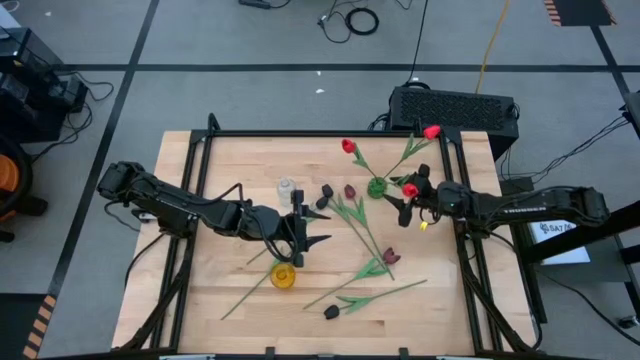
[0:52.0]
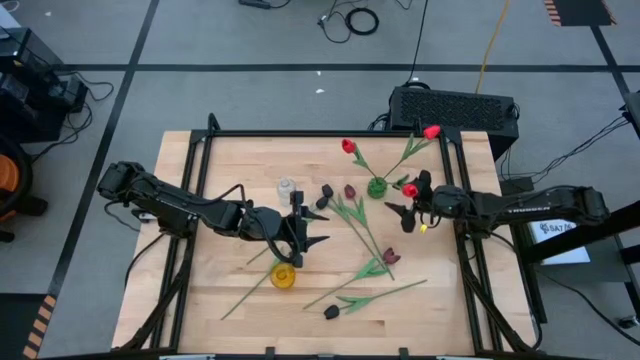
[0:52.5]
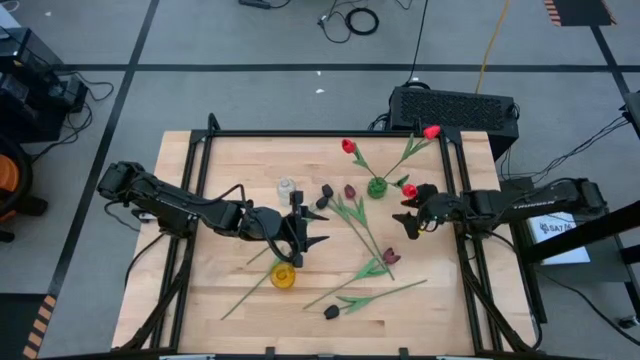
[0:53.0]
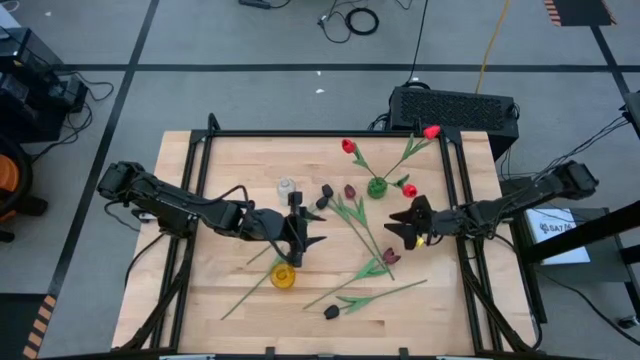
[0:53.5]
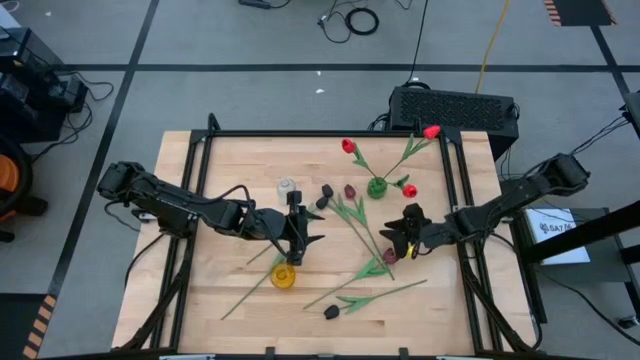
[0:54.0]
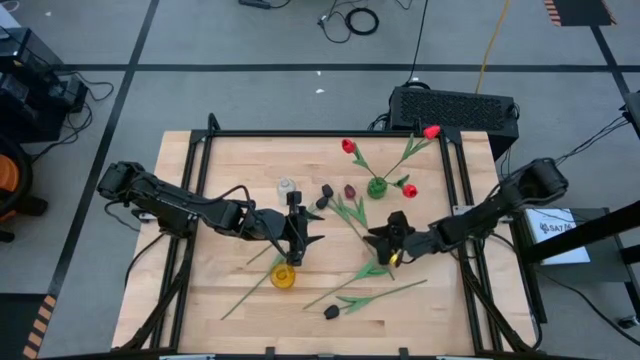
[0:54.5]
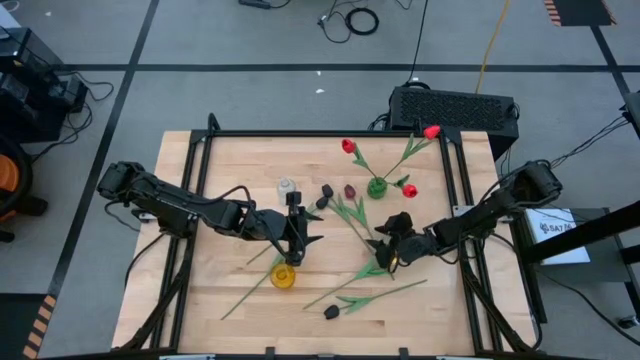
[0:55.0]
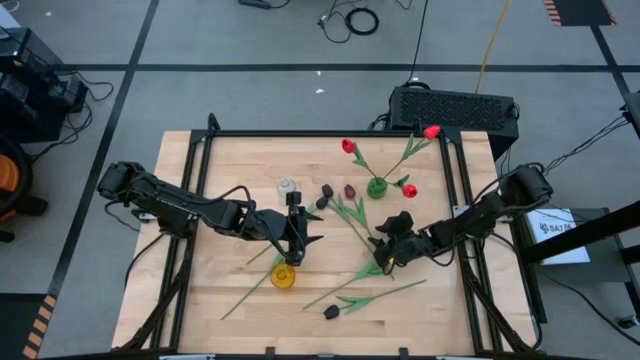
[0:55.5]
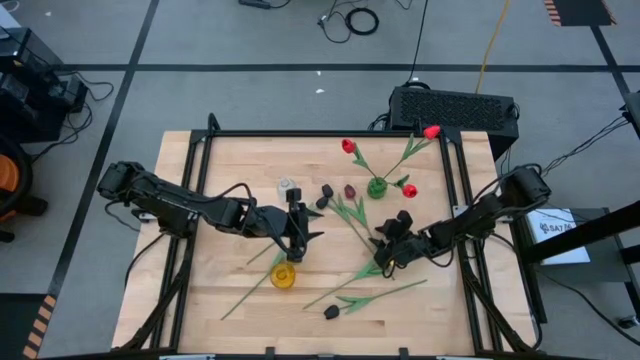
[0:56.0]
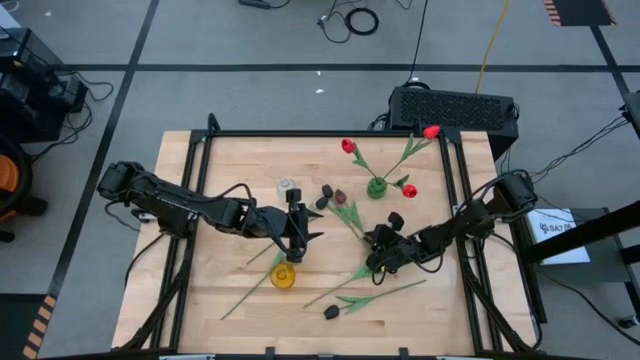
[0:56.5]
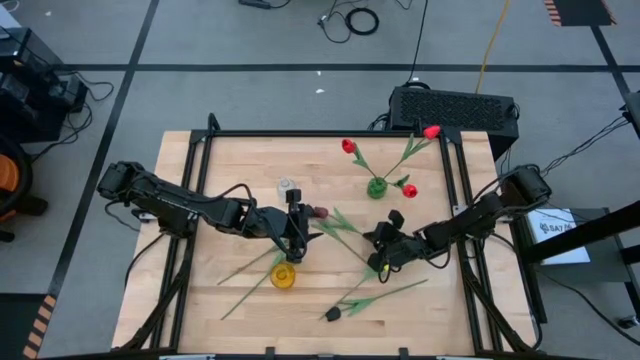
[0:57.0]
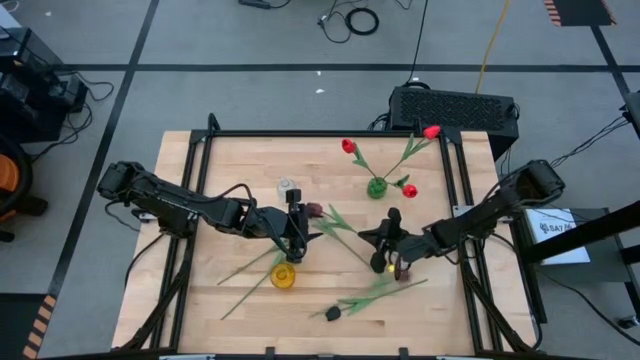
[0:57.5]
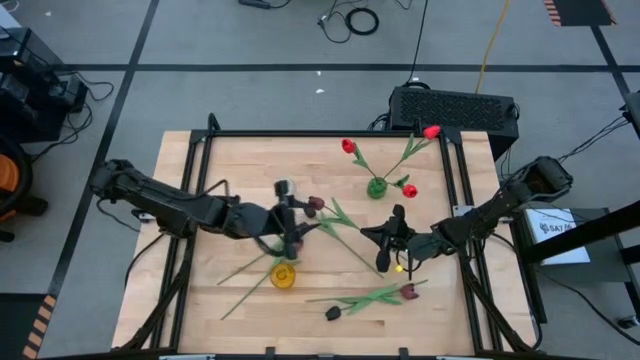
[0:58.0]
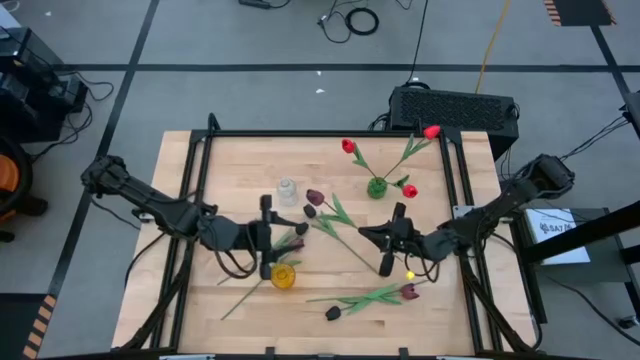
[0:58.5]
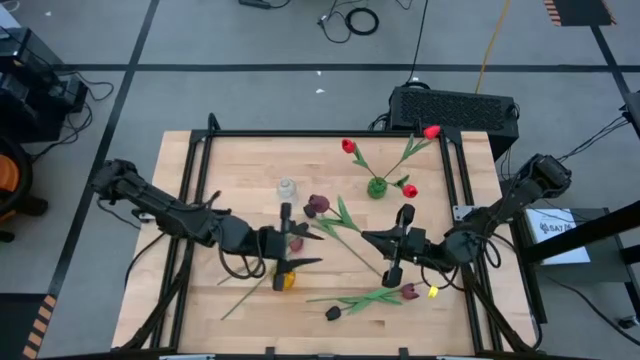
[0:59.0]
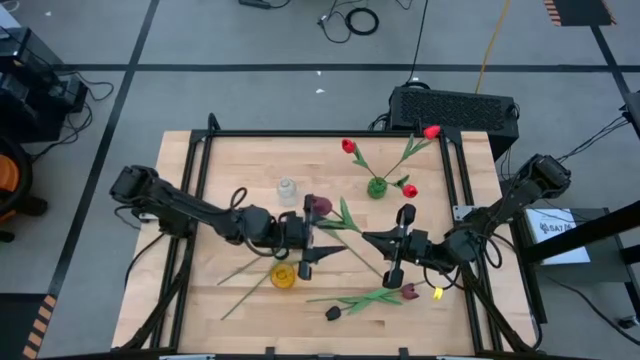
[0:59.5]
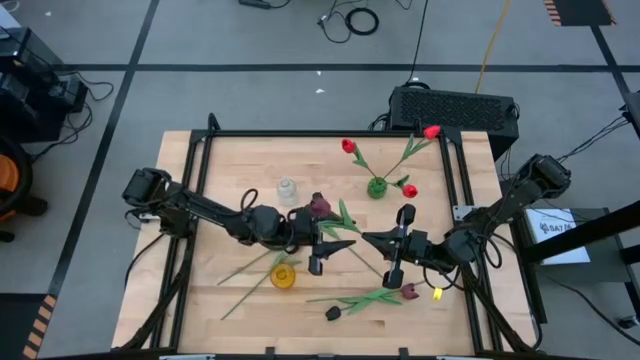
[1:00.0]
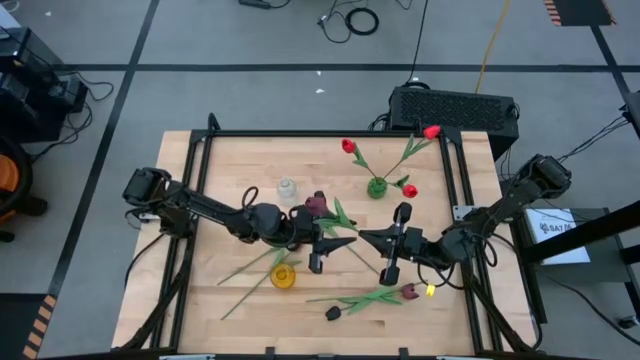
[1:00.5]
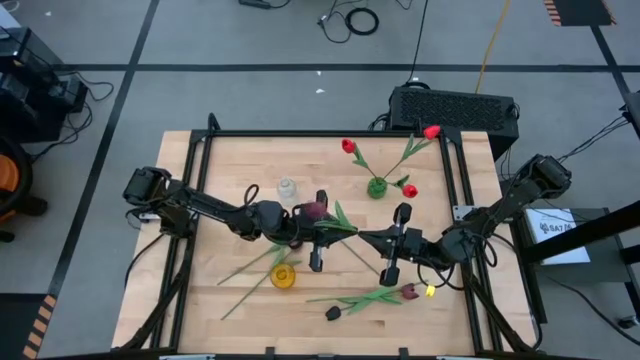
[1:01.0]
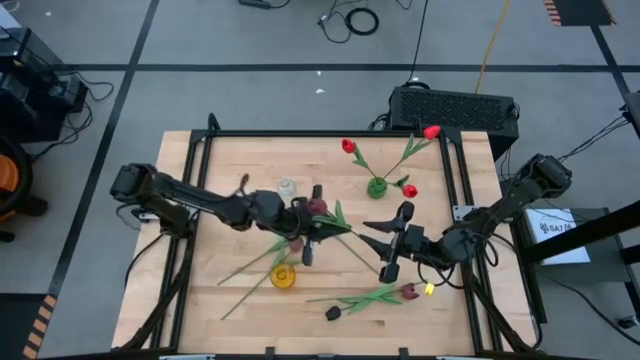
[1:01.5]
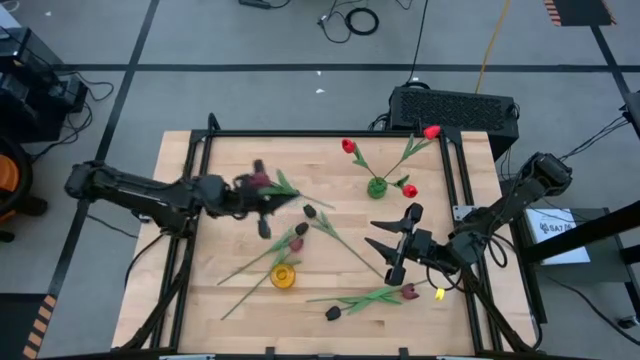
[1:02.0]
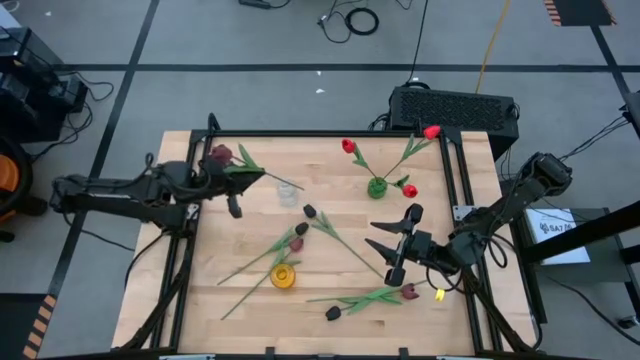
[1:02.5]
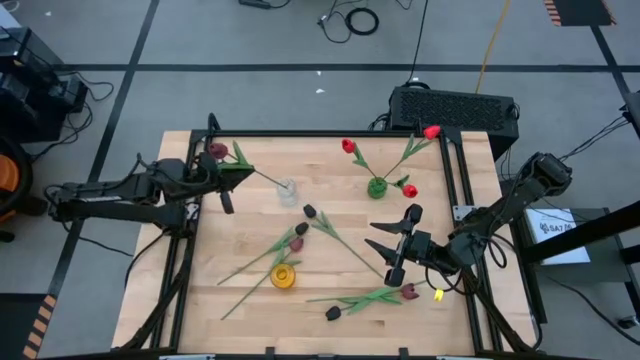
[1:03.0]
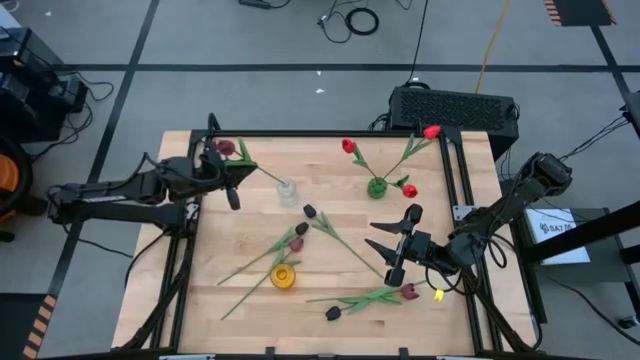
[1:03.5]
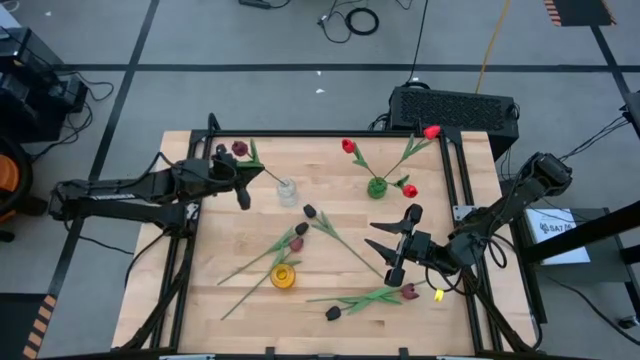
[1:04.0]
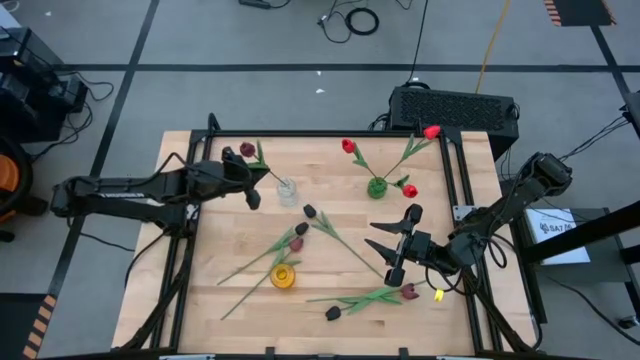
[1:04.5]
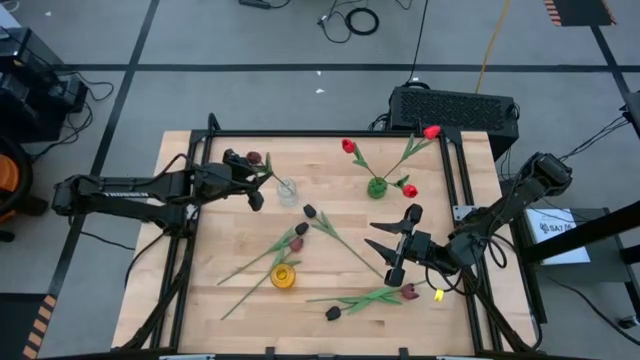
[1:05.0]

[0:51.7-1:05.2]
Task: Sort flowers into vase by color
Put the top dark red tulip into the transparent vase

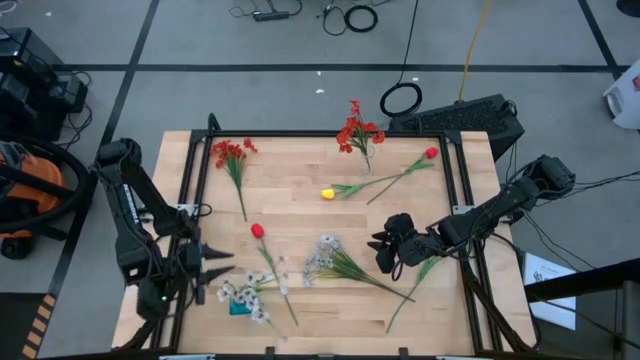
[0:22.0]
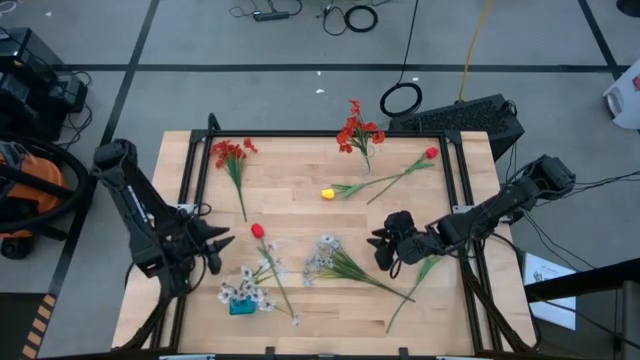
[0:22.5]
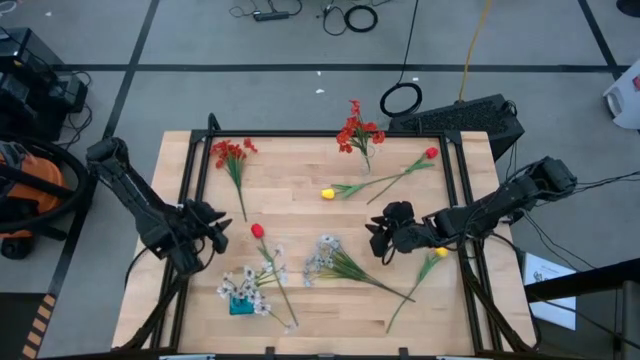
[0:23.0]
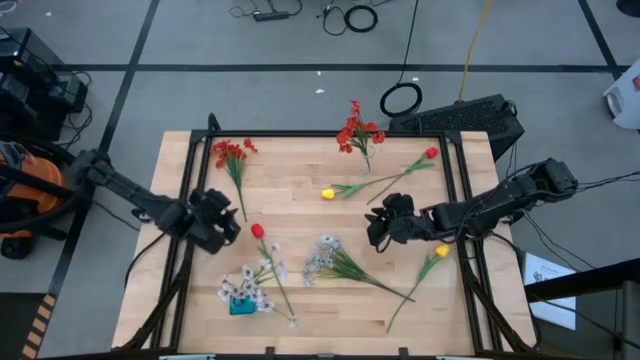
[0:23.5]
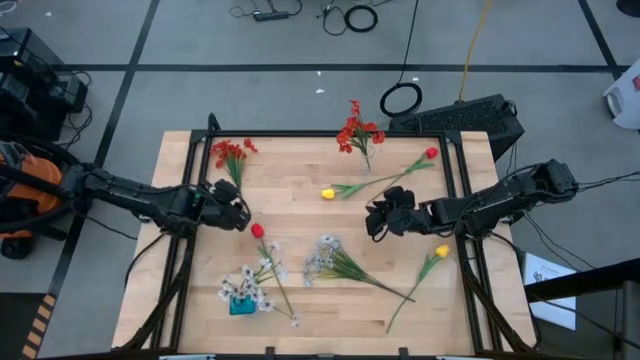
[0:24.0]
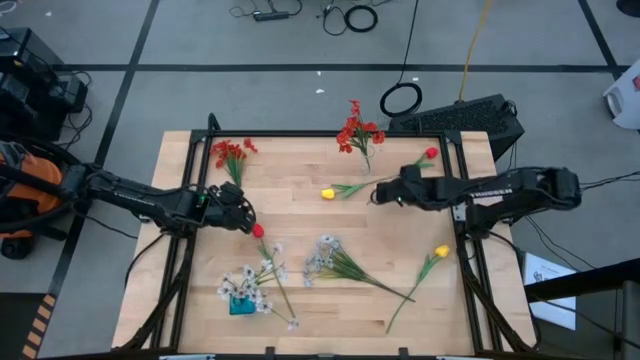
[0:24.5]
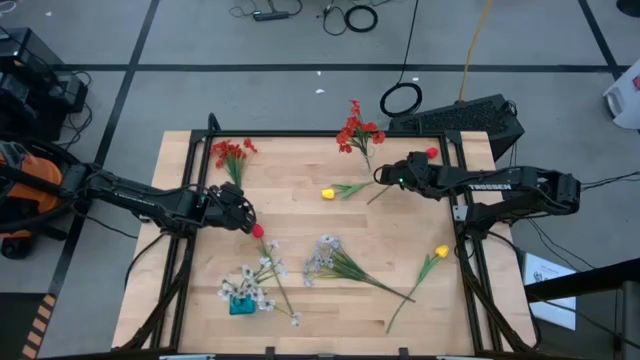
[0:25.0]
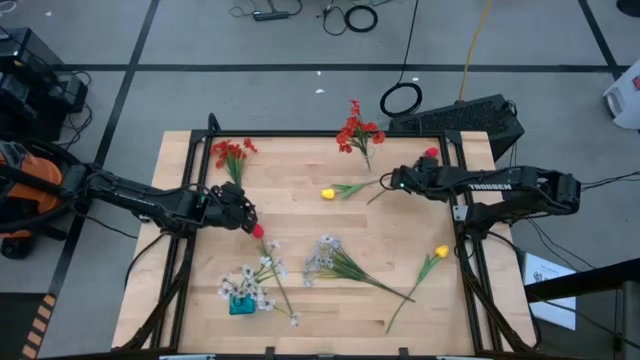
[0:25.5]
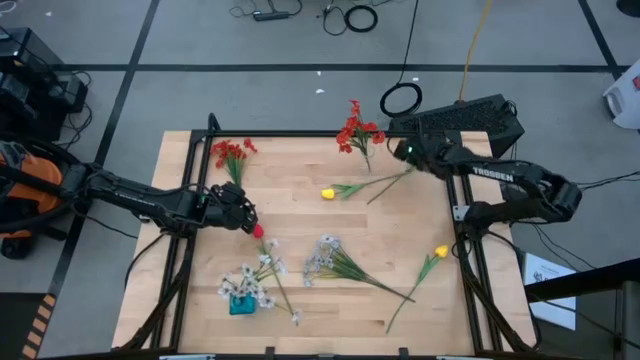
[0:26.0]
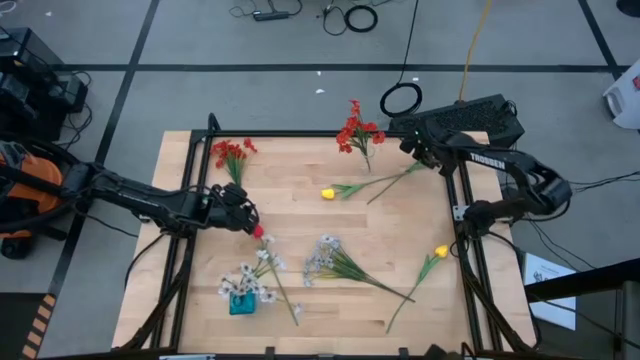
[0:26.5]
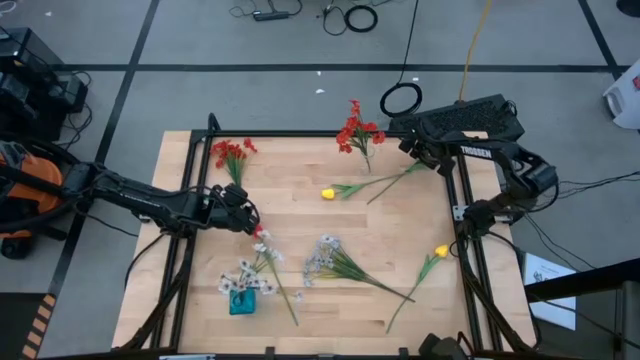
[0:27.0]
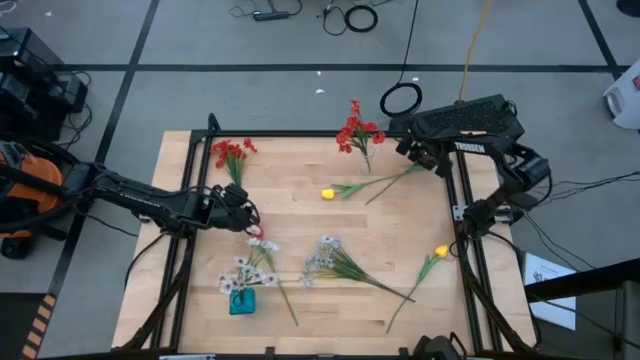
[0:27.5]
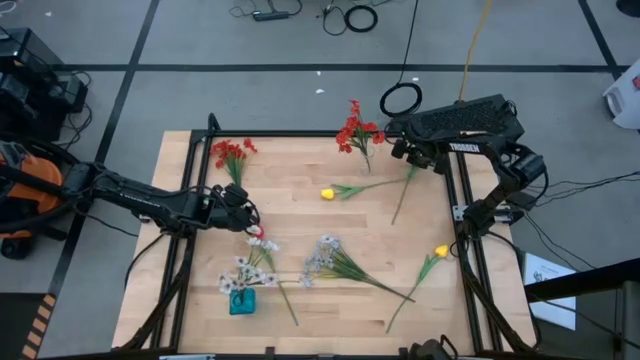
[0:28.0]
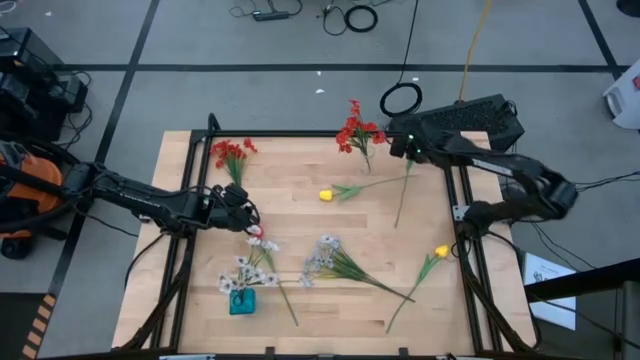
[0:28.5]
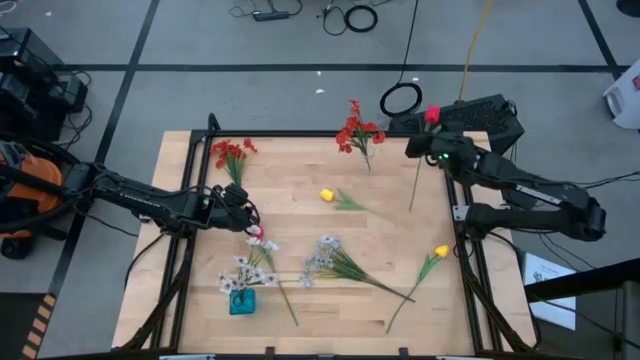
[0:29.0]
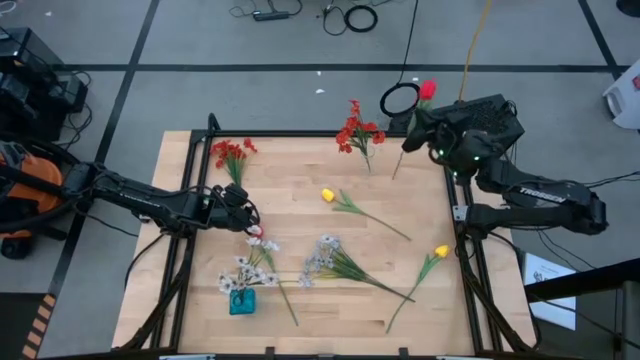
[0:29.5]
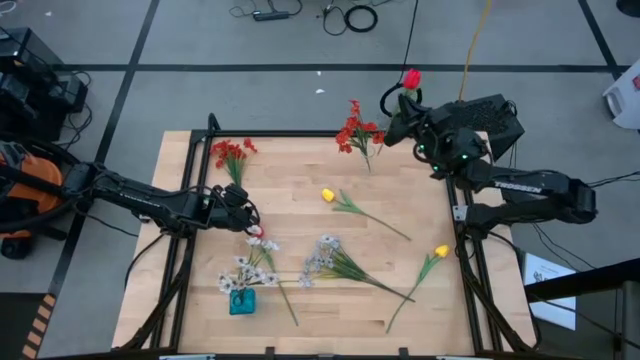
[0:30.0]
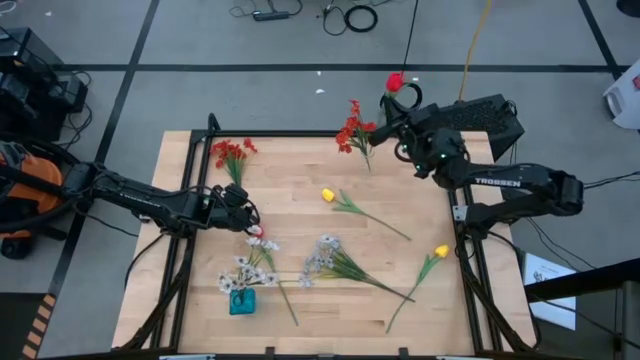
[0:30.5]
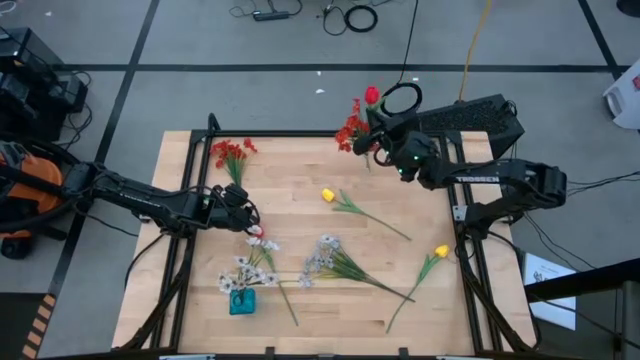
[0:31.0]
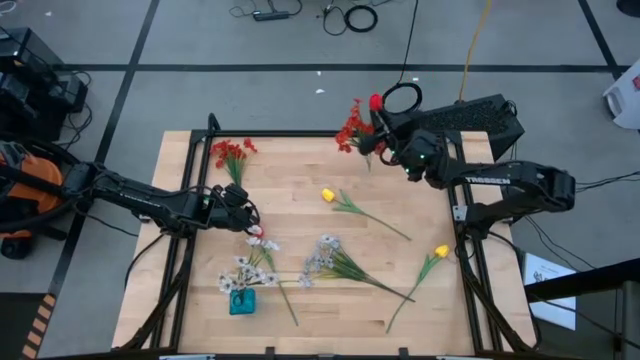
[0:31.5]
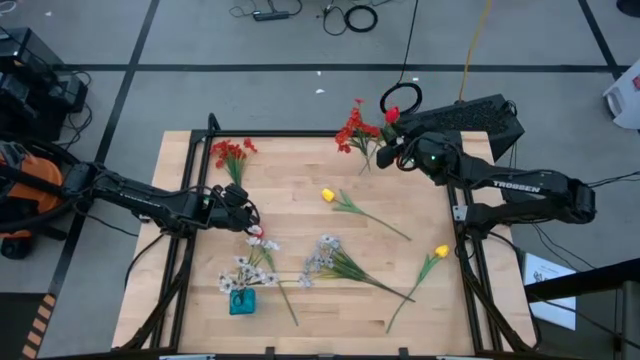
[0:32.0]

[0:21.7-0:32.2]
Task: Sort flowers into vase by color
Put the top red flower into the transparent flower vase
